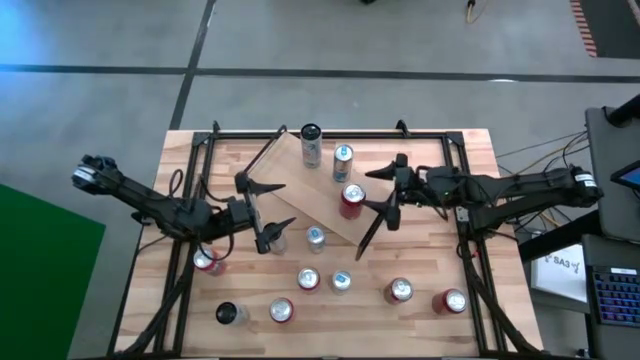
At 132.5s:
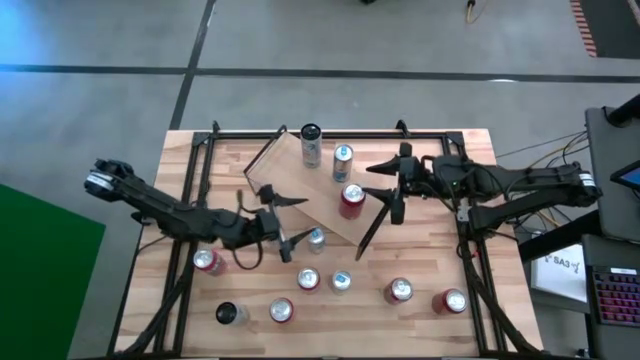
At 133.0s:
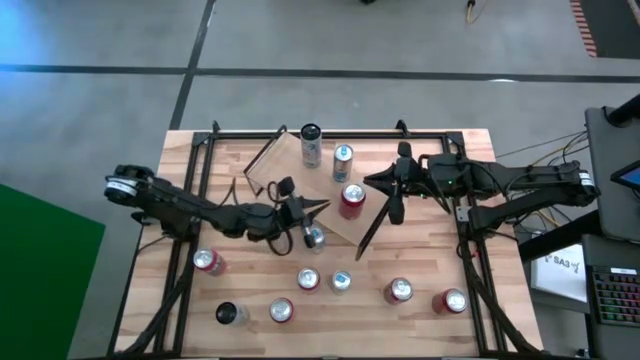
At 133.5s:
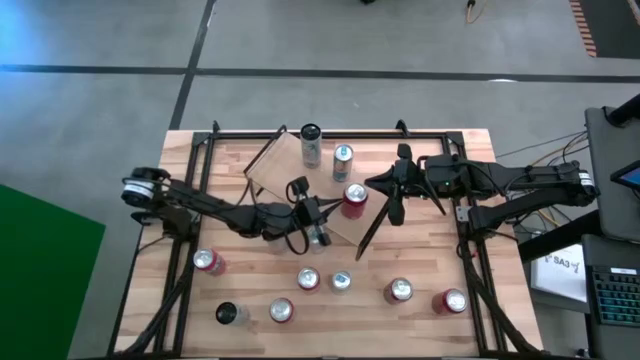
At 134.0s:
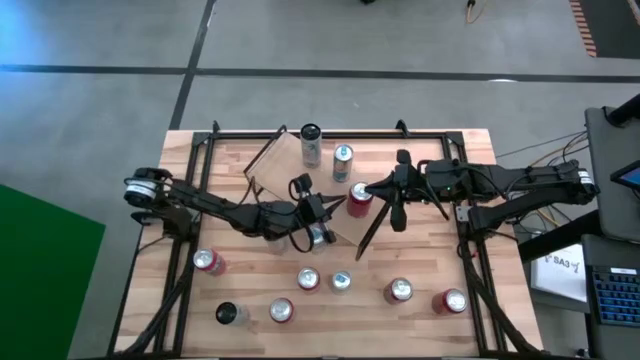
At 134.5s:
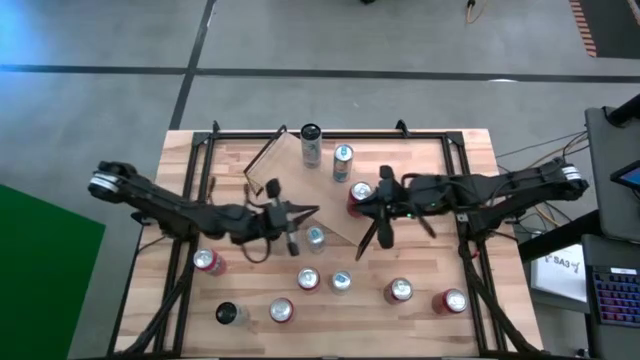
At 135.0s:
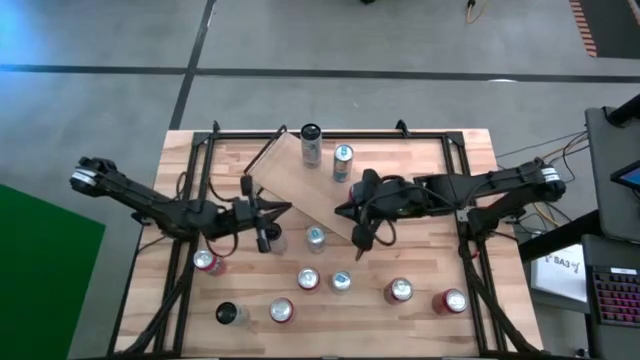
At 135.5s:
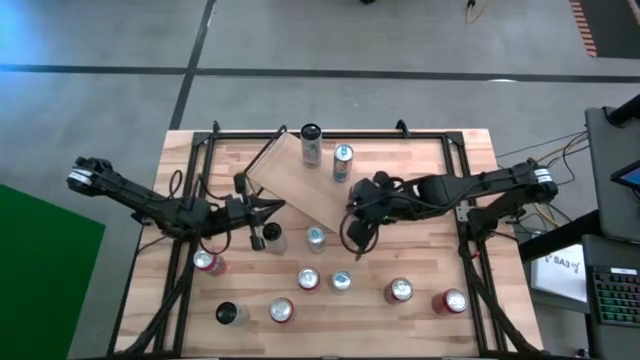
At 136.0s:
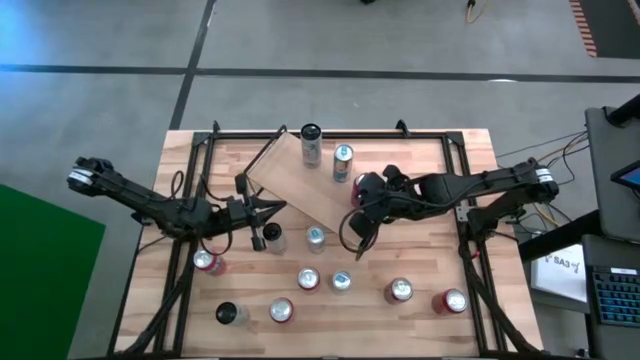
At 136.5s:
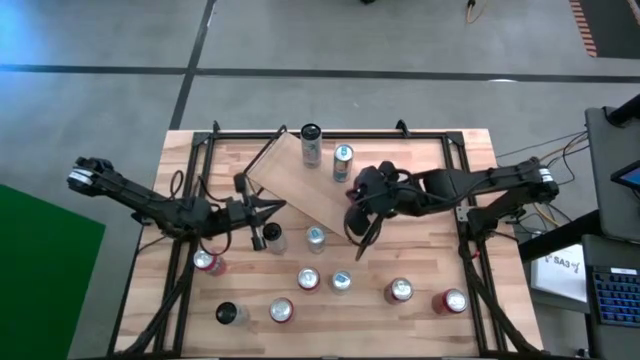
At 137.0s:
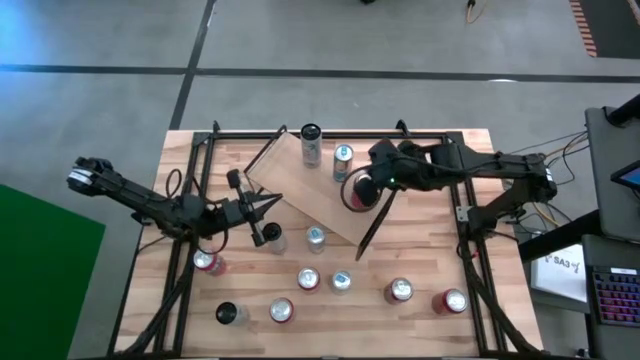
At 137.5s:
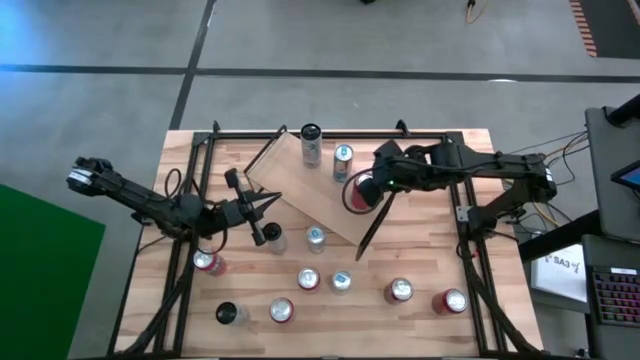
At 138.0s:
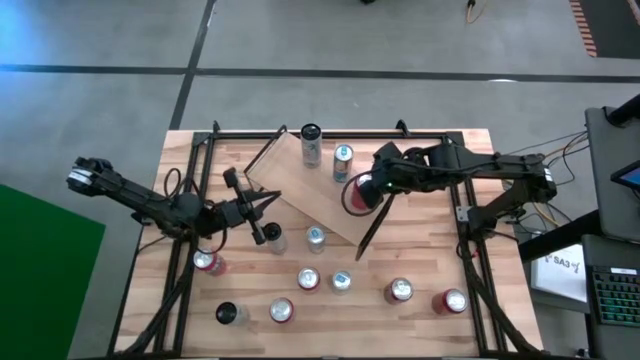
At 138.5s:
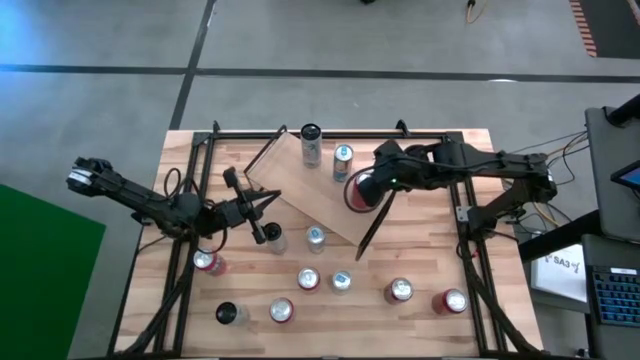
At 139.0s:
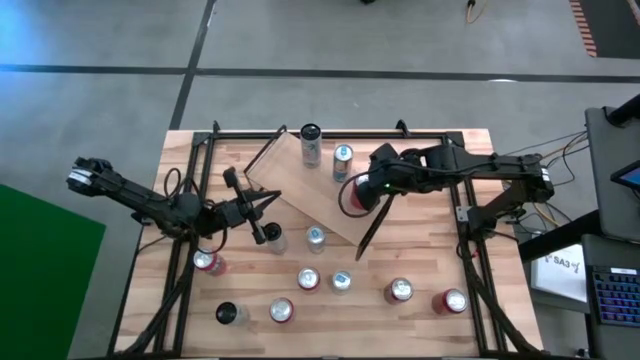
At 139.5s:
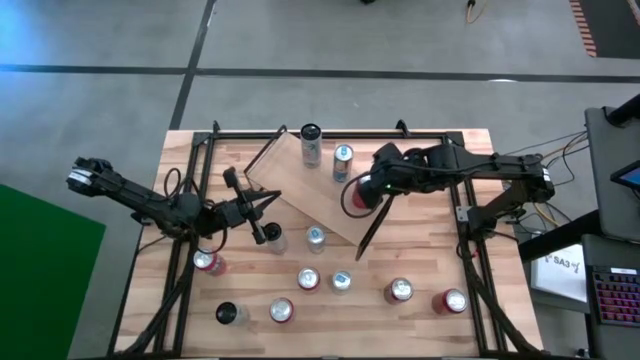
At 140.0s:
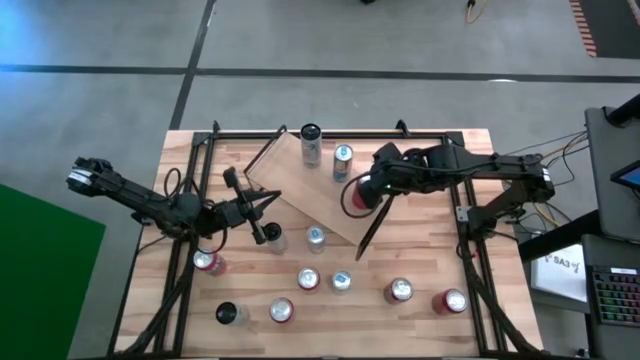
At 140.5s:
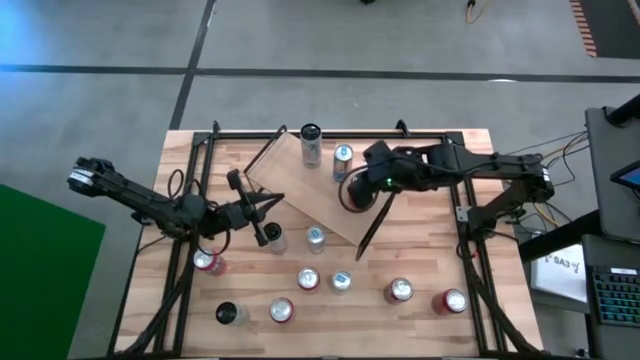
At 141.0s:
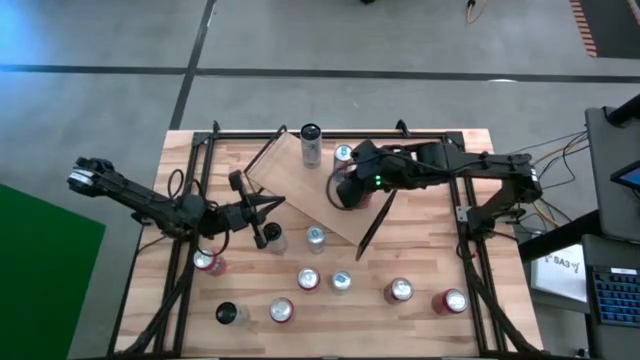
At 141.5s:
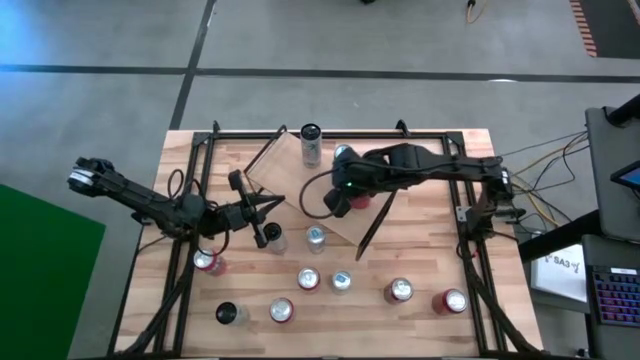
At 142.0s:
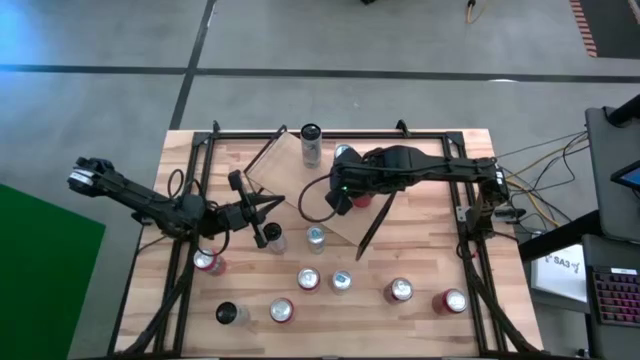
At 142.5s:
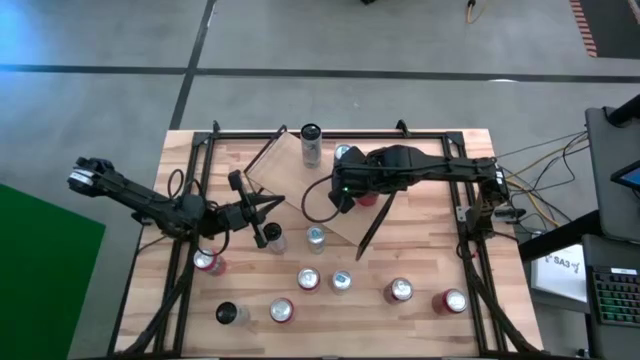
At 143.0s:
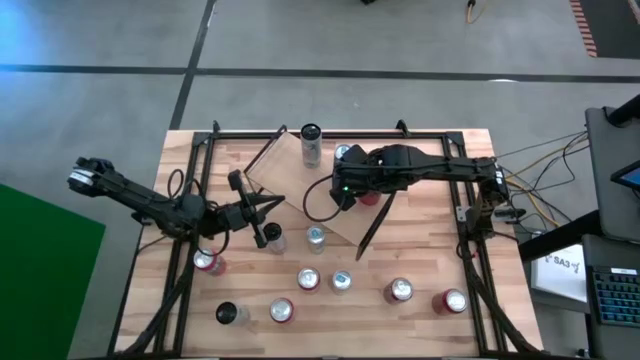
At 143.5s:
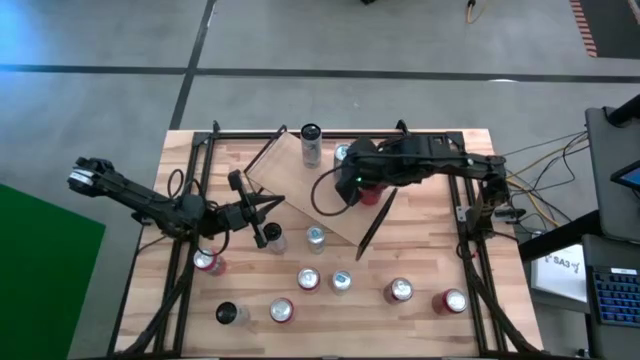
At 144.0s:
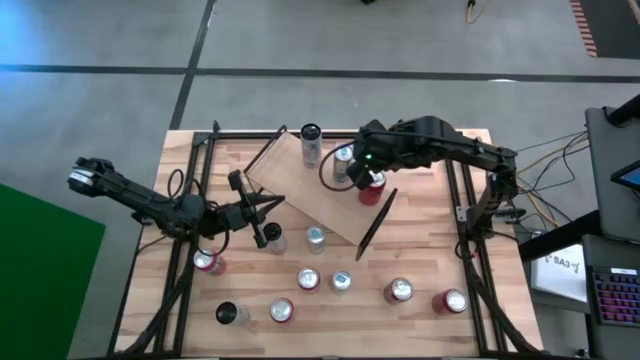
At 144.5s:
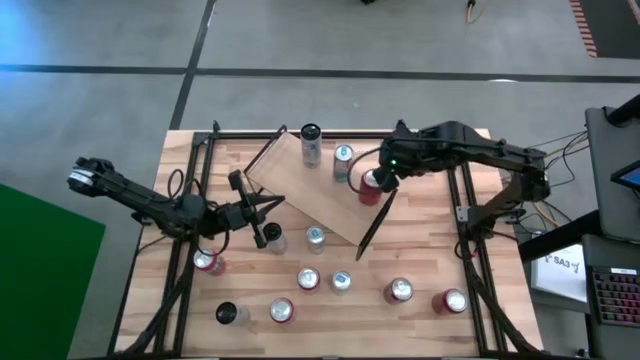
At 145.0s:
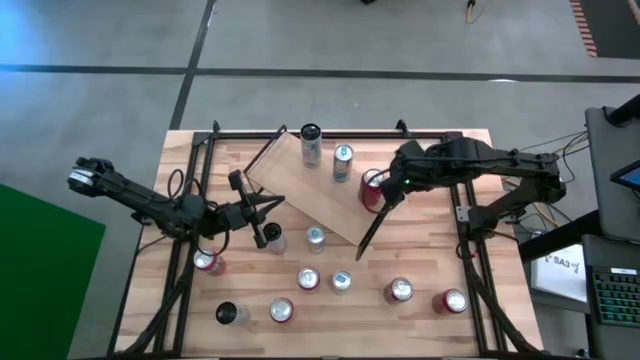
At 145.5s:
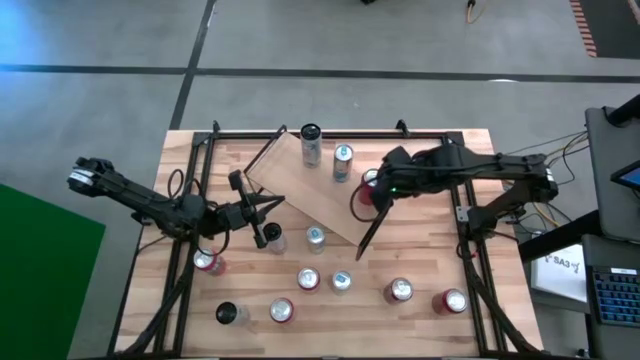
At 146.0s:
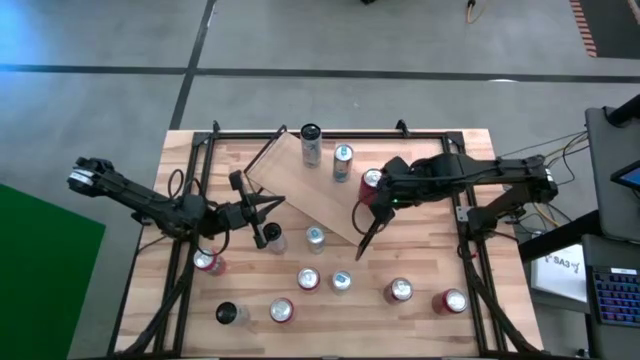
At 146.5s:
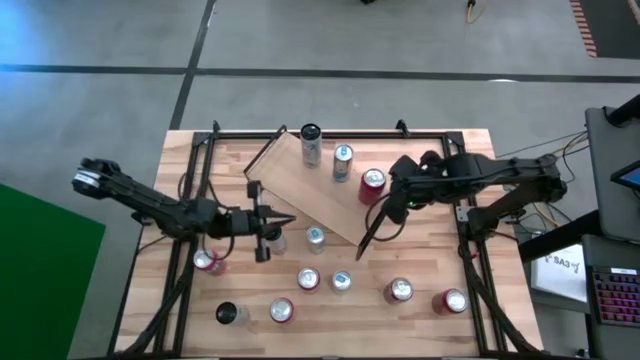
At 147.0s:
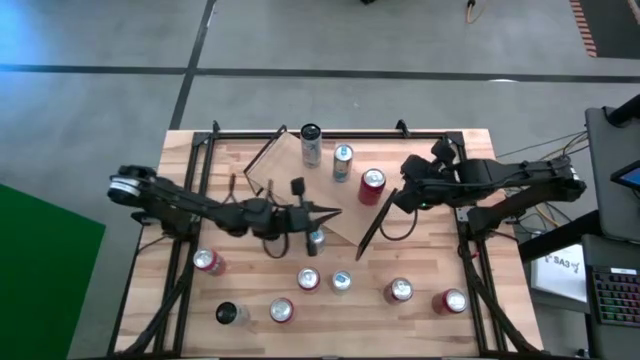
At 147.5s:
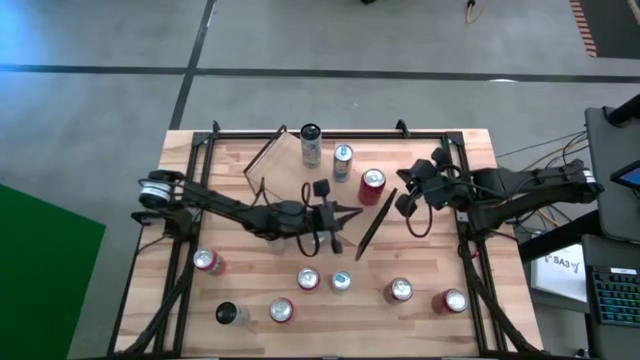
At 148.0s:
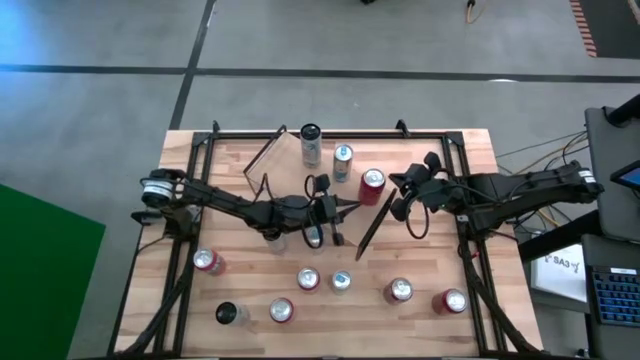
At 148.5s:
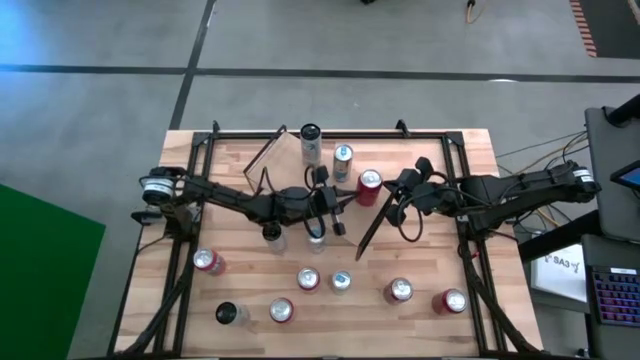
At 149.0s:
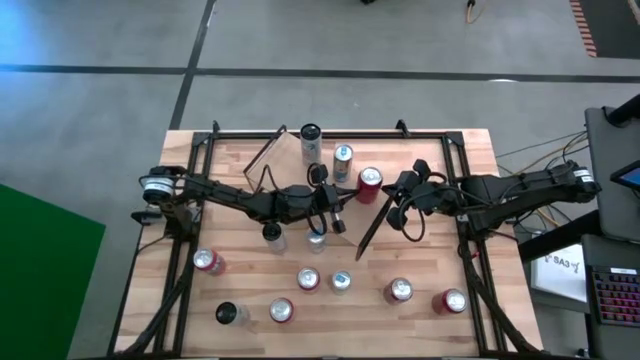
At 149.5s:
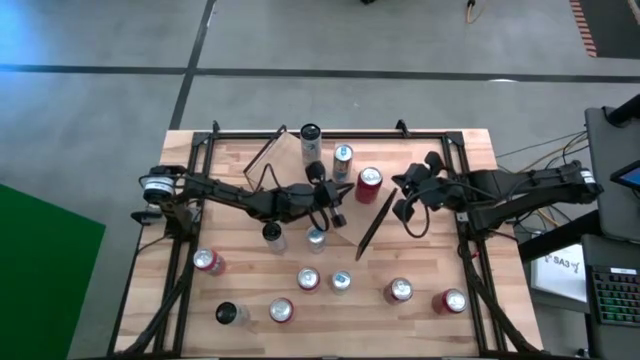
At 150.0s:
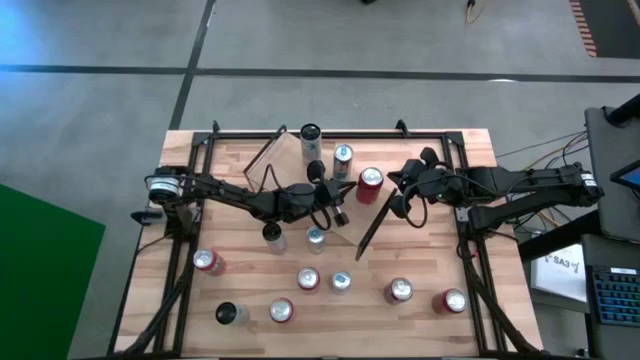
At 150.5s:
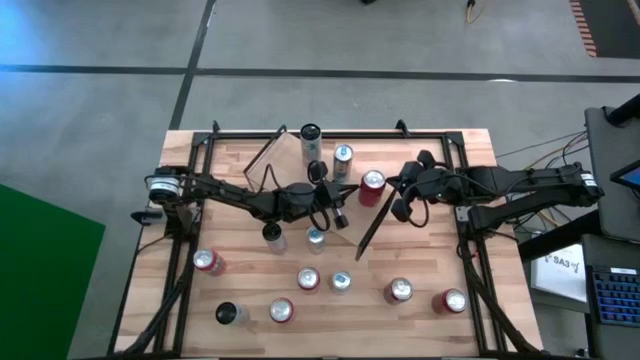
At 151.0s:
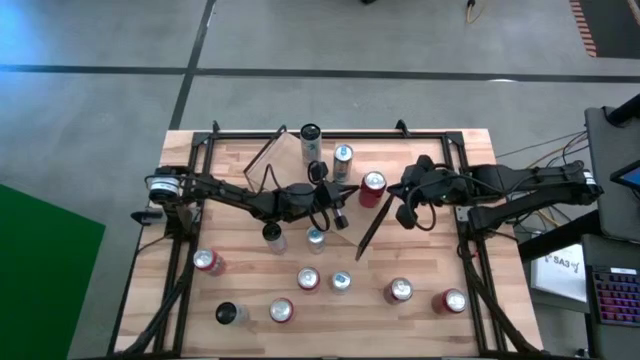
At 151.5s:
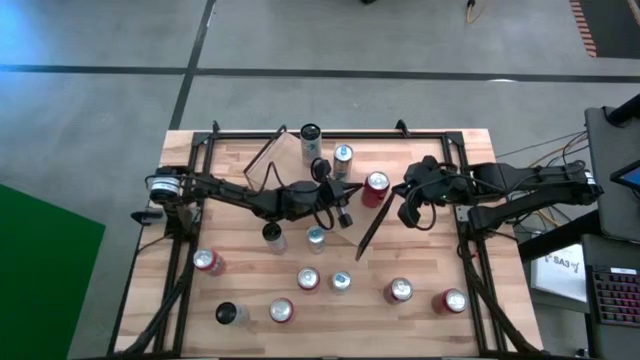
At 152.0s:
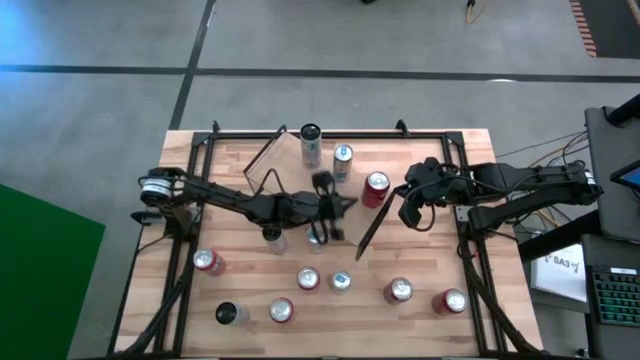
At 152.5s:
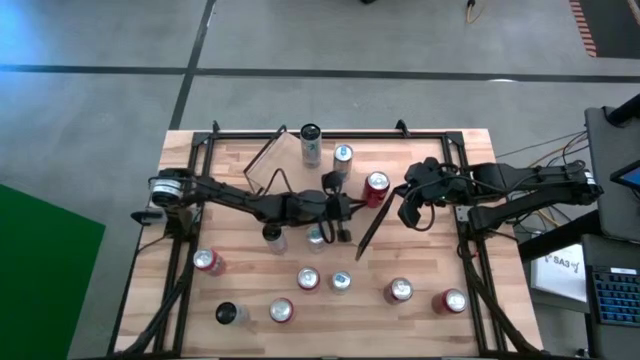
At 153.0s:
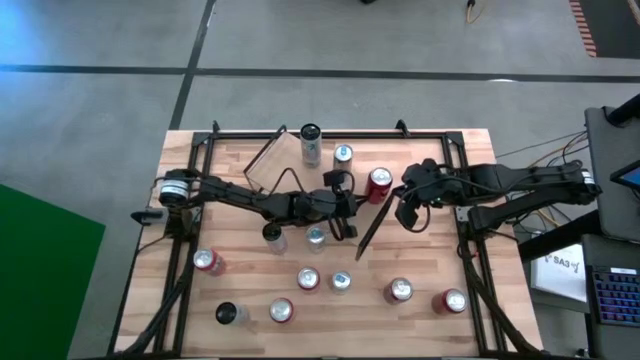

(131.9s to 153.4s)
Task: Place canned beverage on shelf
Put the red/black soda can on the shelf
